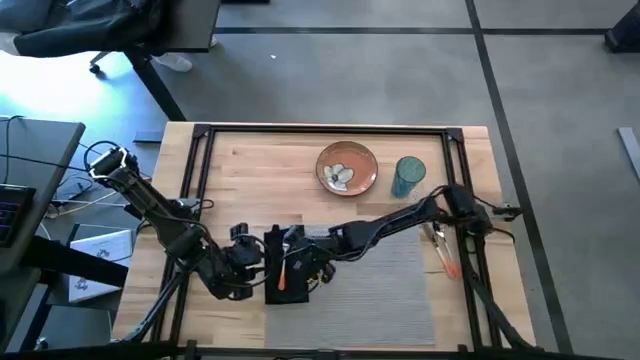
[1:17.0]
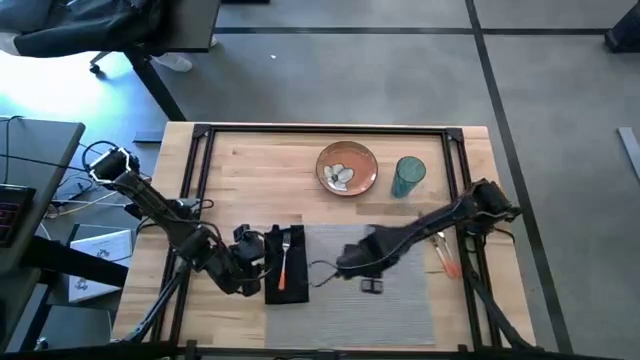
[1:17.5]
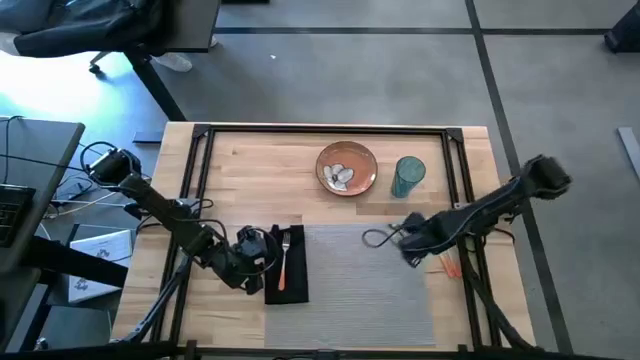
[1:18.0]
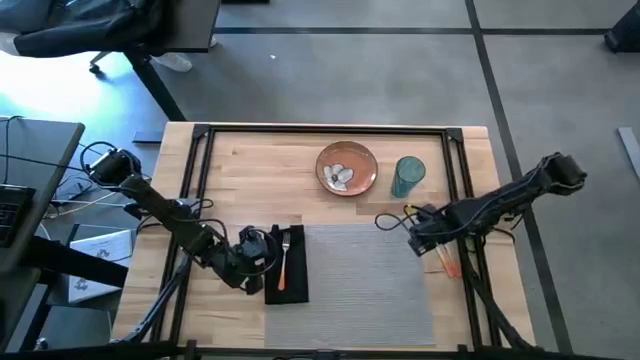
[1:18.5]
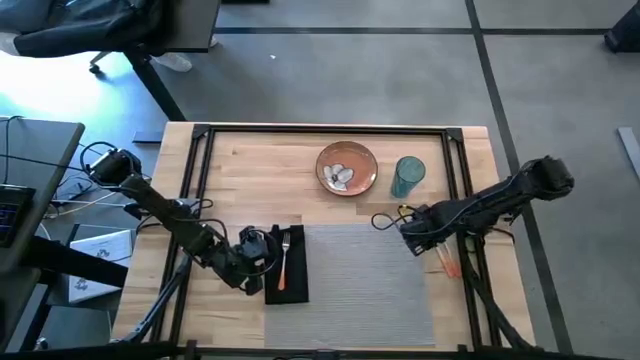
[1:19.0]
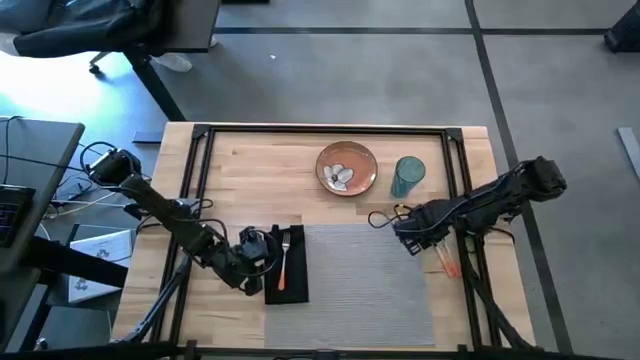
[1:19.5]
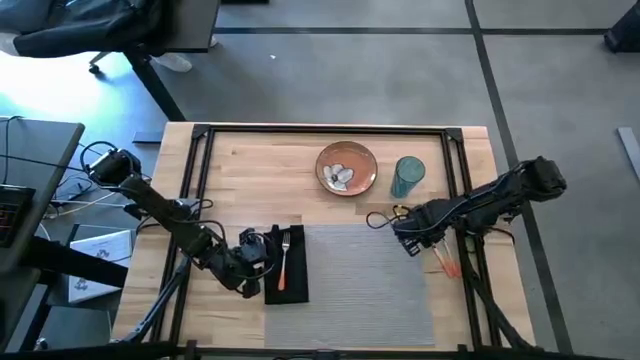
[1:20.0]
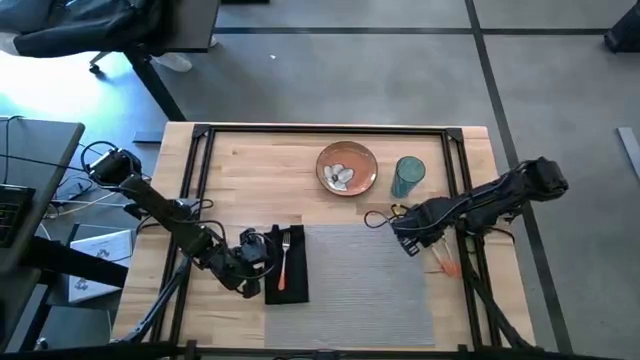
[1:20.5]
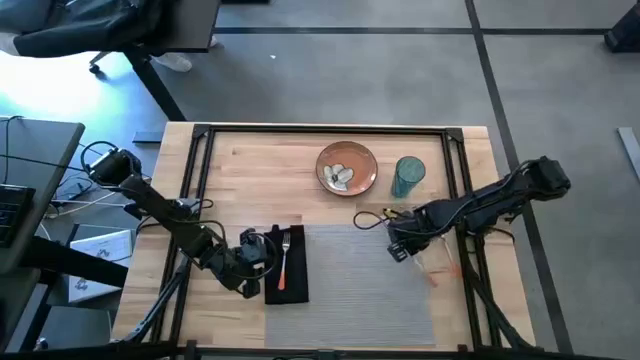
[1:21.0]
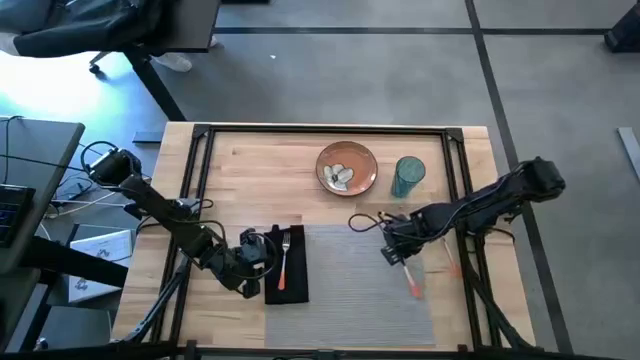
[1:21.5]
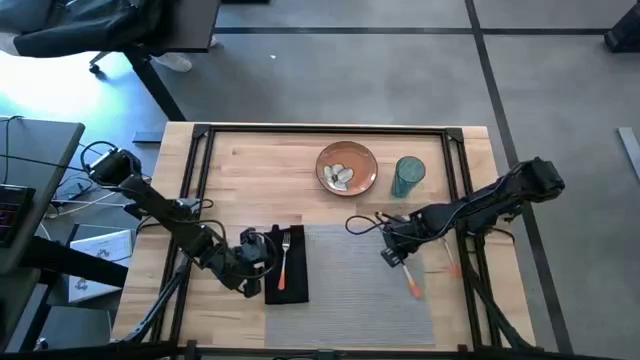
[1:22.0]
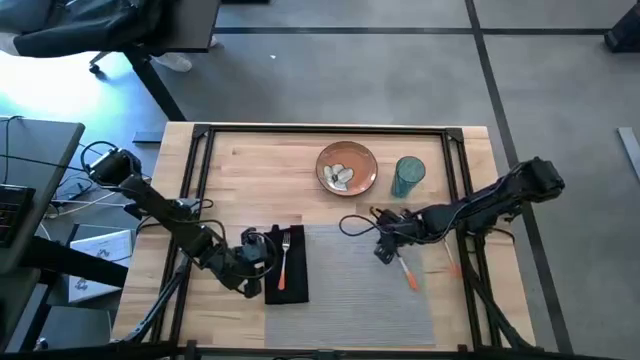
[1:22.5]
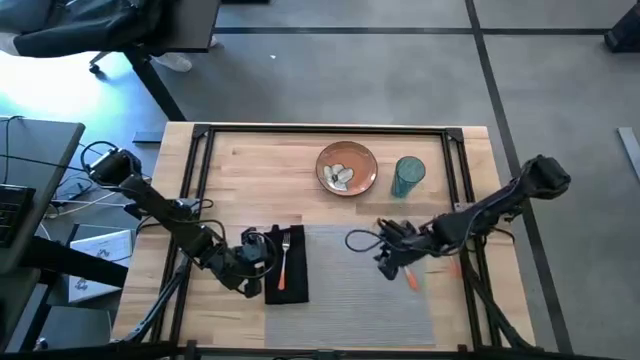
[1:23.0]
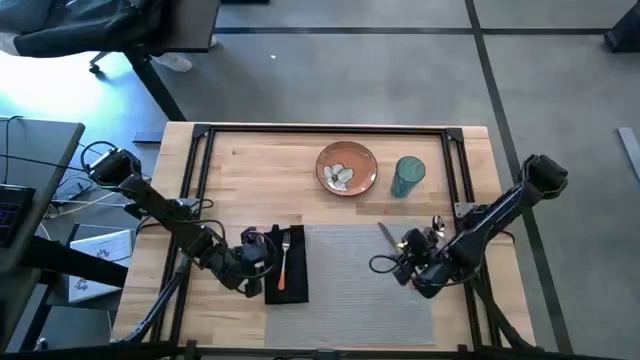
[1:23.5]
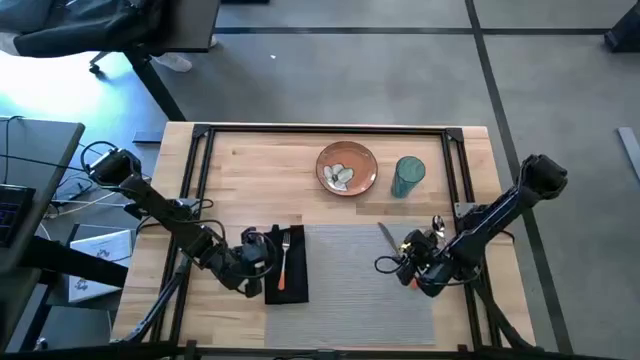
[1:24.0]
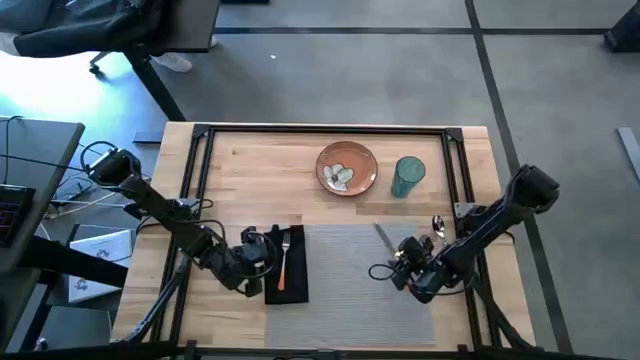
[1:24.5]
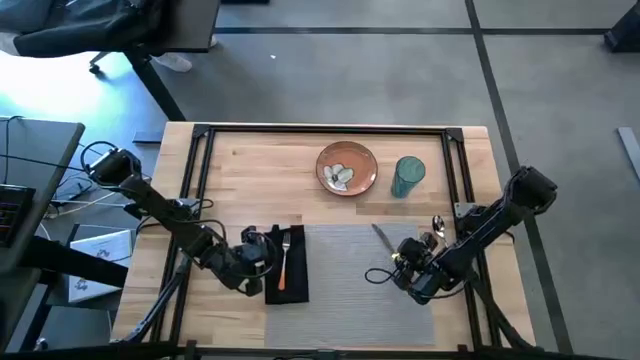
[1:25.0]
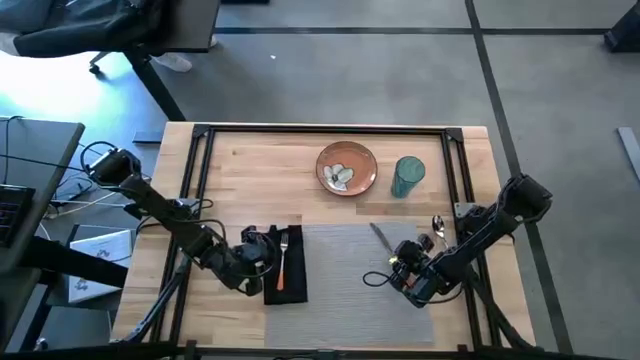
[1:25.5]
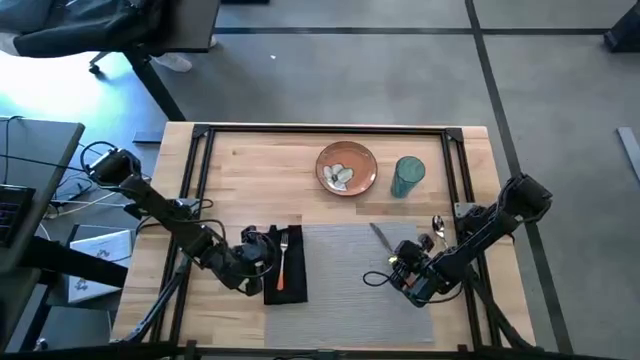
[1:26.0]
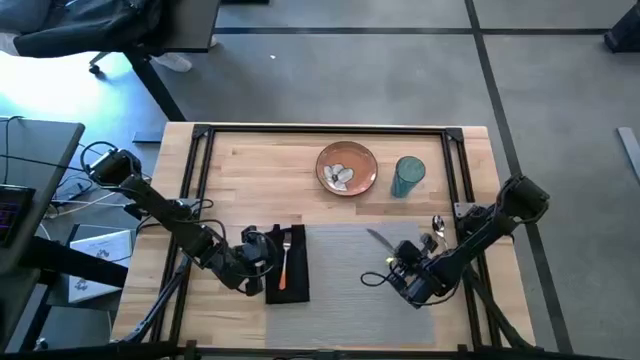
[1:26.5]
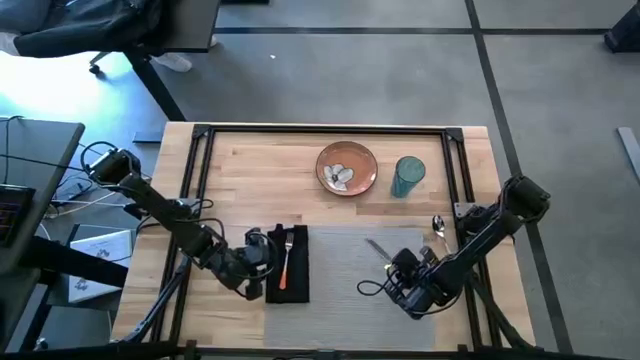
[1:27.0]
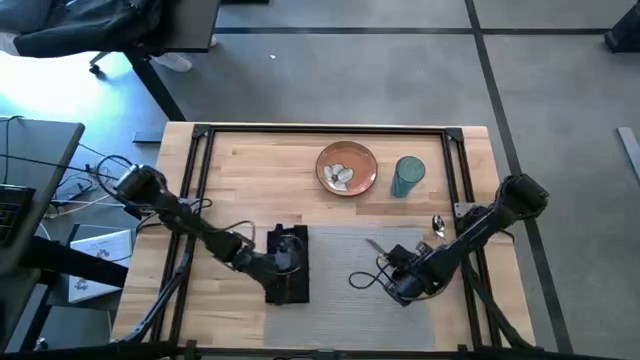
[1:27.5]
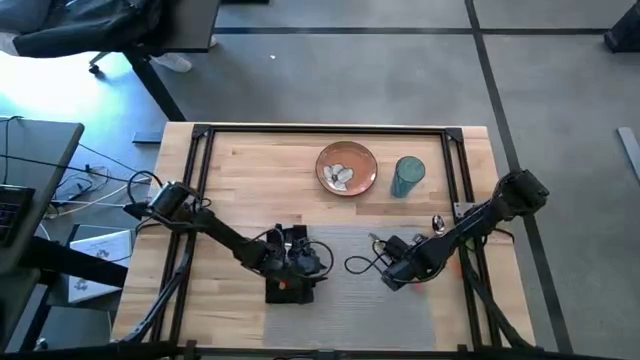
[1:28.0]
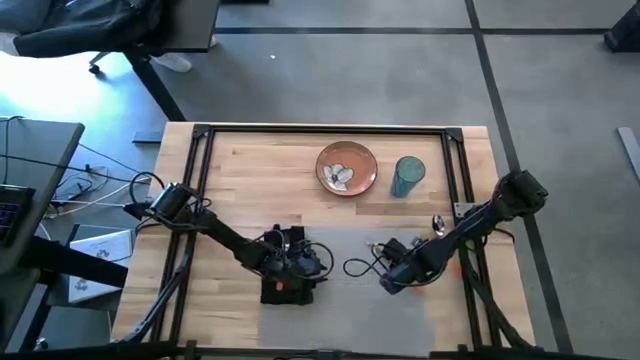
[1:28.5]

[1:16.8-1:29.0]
Task: Set table place
Put the orange table knife on the right side of the gray tablemat

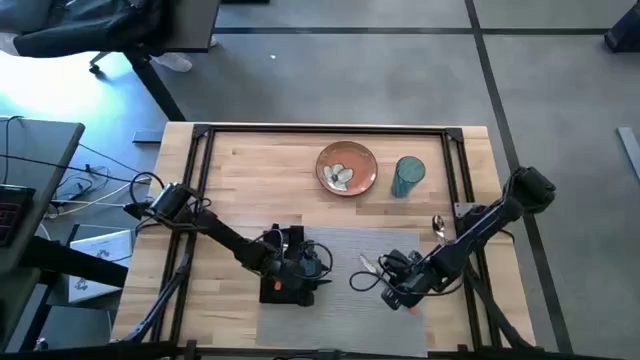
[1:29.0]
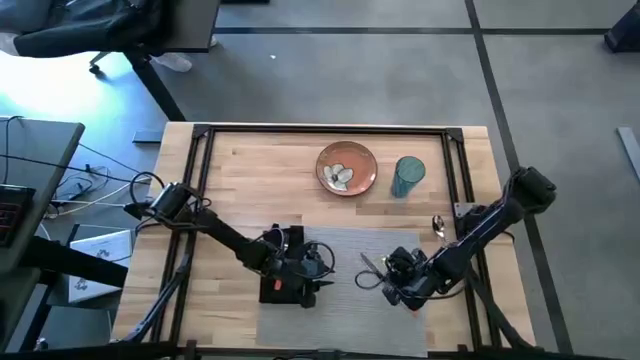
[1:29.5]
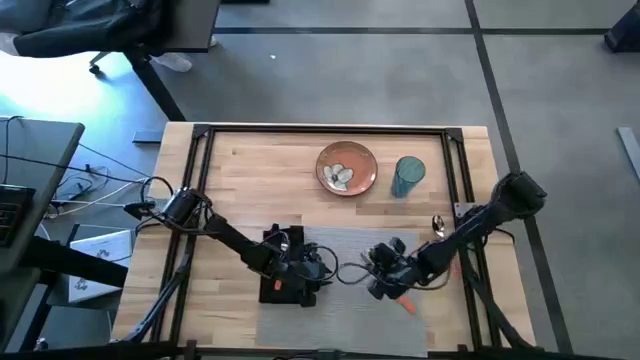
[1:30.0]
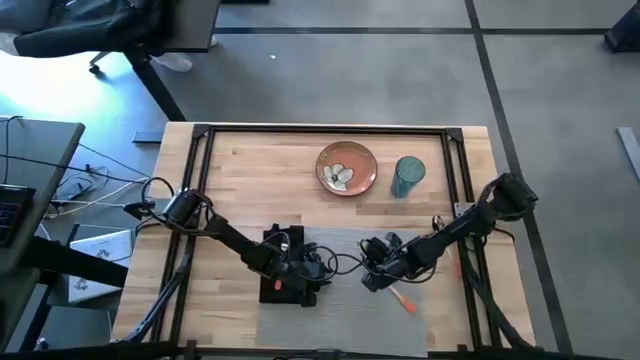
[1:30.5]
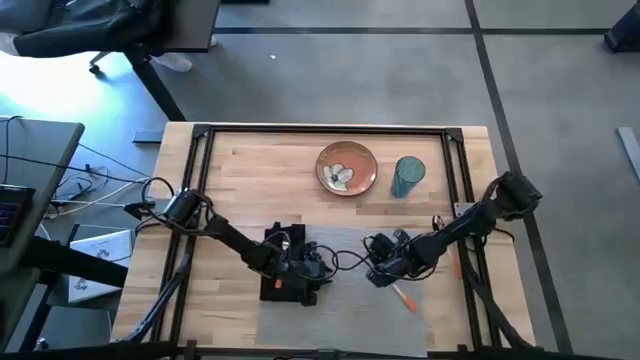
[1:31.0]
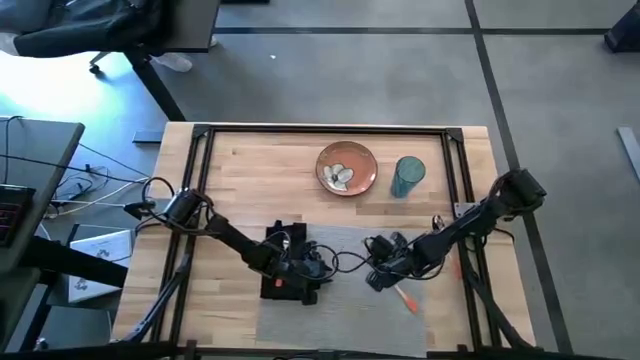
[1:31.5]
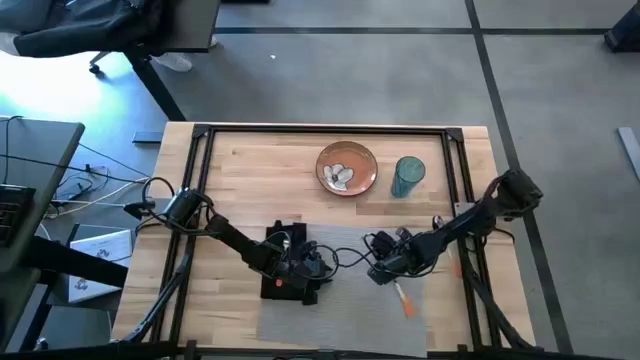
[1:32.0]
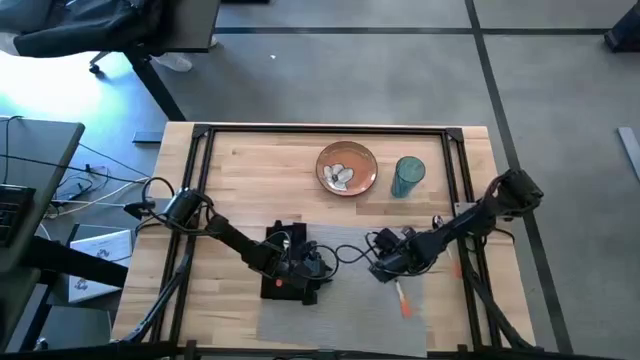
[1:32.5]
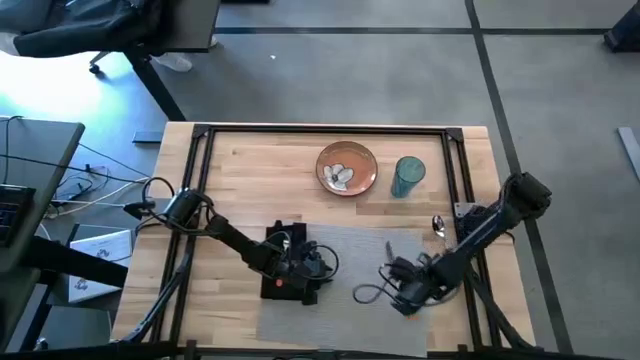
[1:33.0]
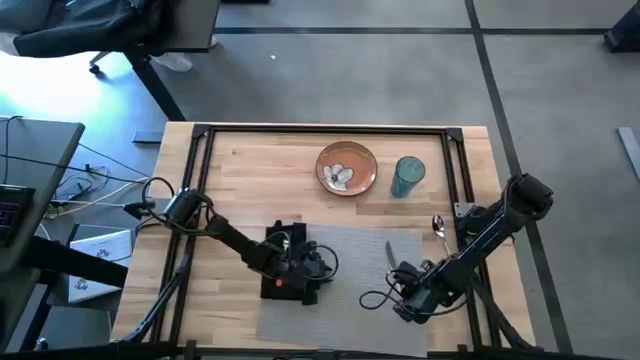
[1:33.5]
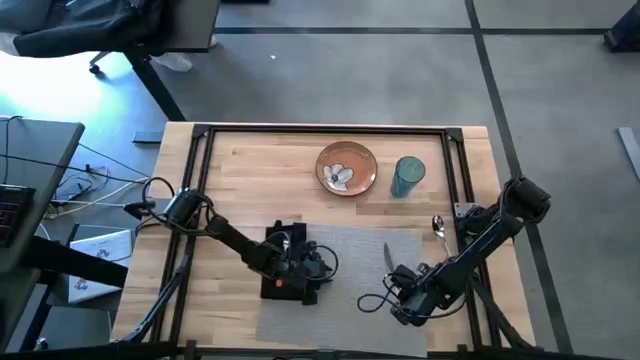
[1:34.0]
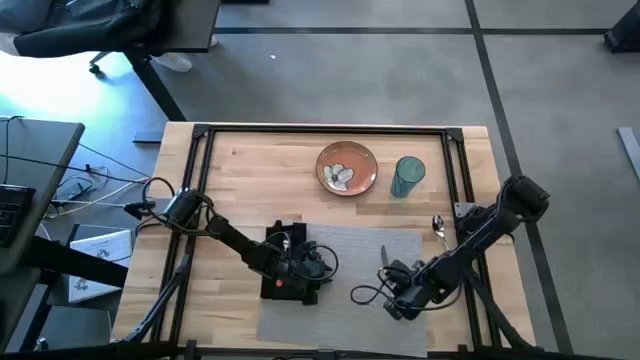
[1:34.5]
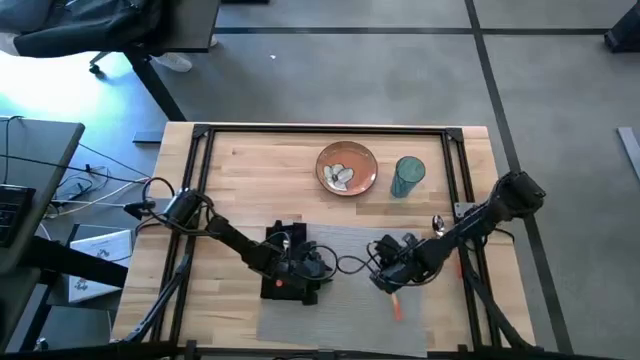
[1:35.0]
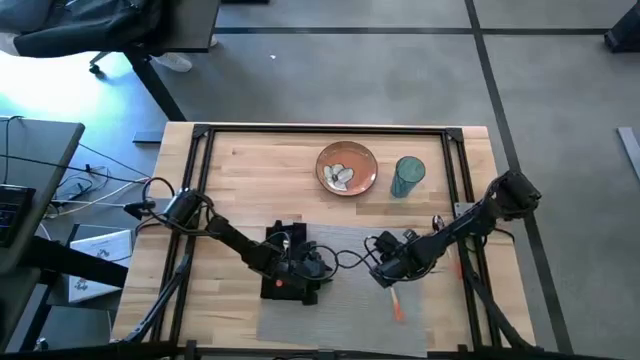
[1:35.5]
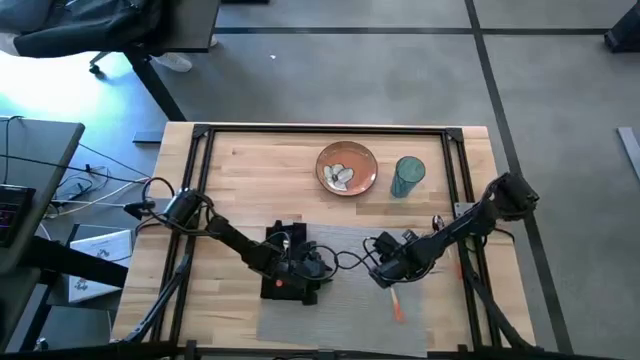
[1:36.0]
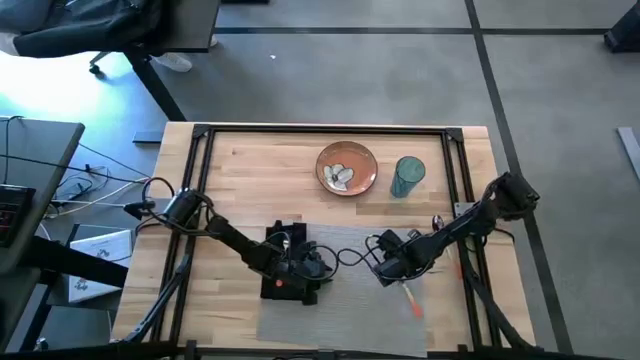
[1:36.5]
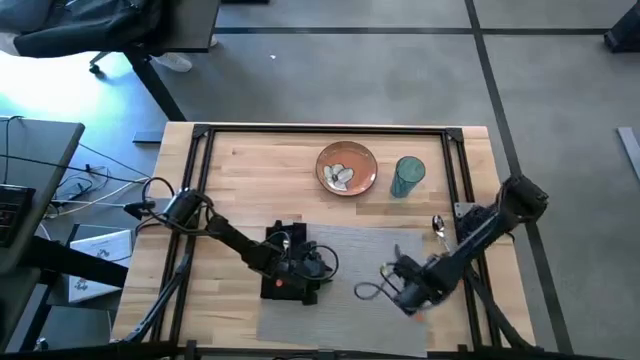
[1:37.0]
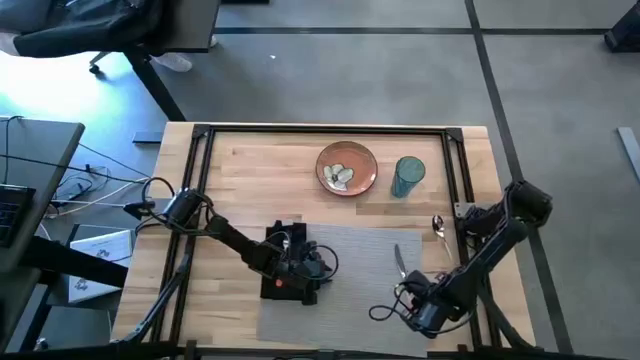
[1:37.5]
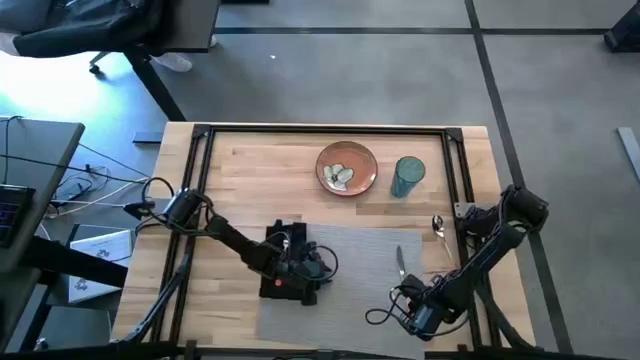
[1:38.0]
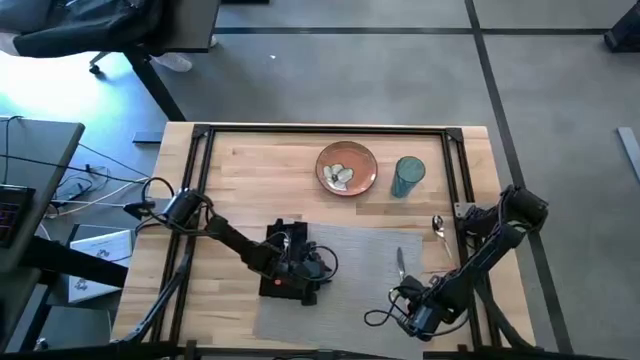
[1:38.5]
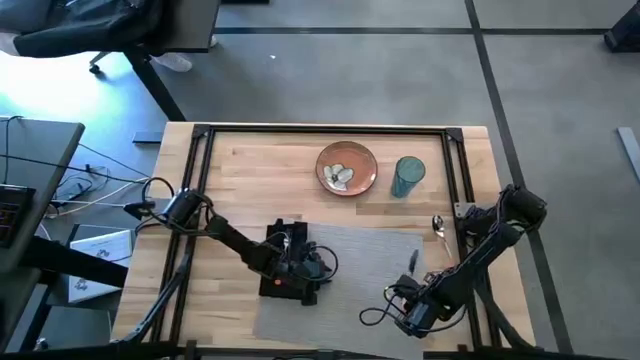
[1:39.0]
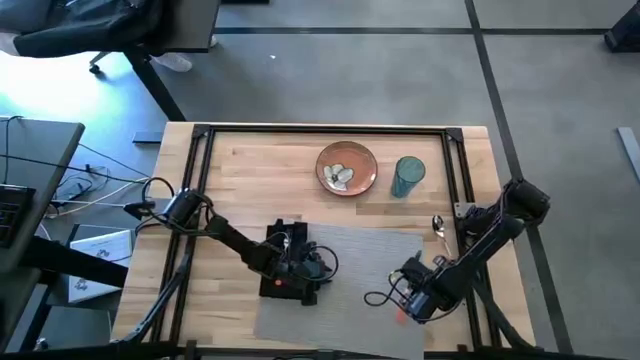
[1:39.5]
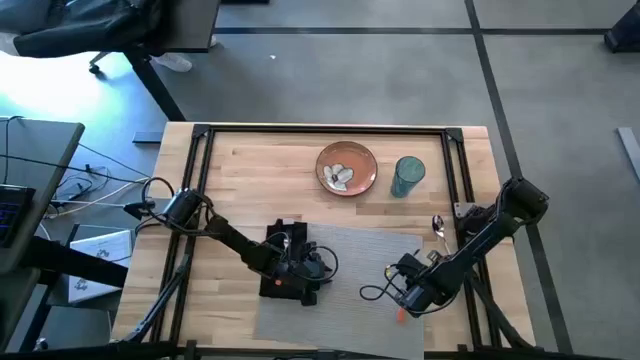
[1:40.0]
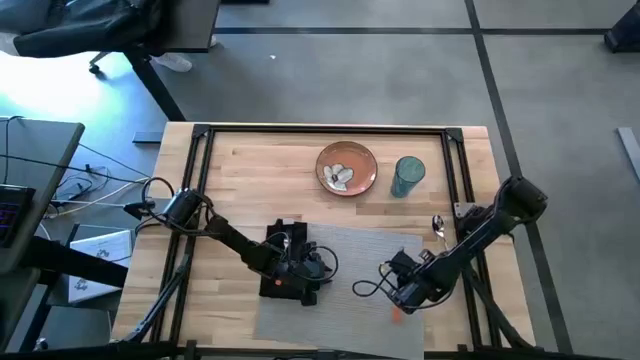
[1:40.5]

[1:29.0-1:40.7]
Put the orange table knife on the right of the gray tablemat
